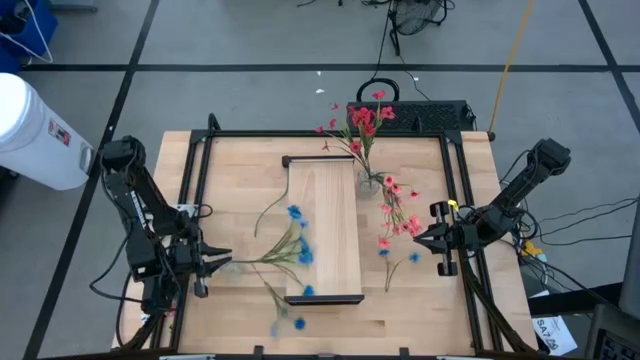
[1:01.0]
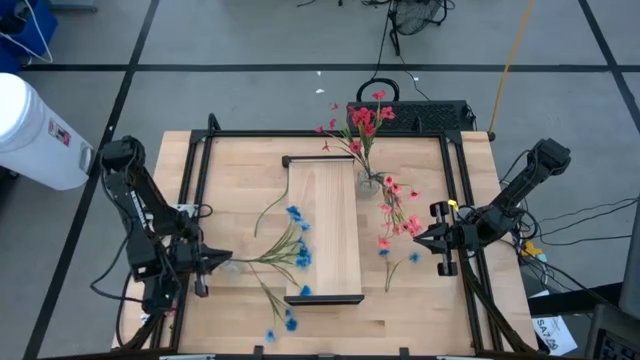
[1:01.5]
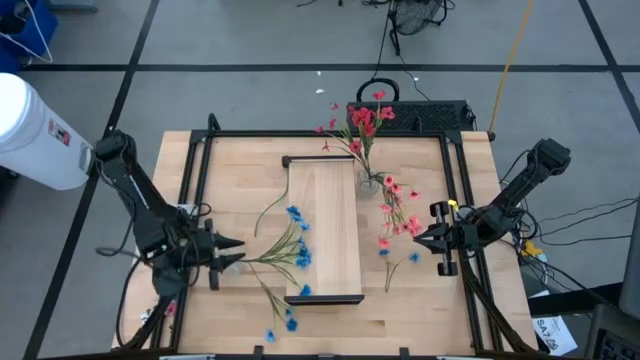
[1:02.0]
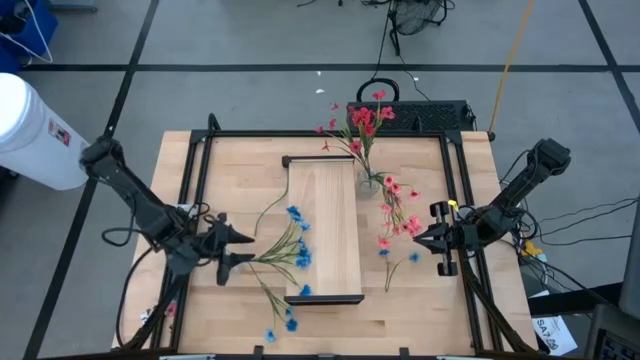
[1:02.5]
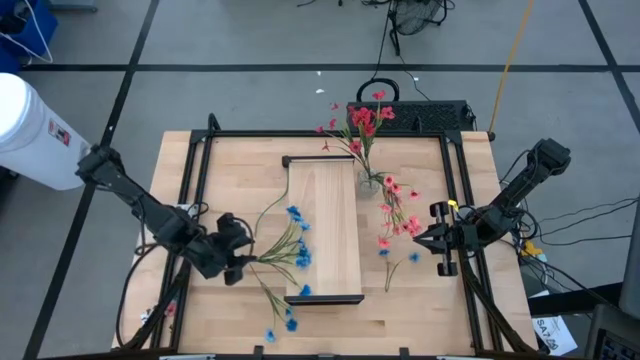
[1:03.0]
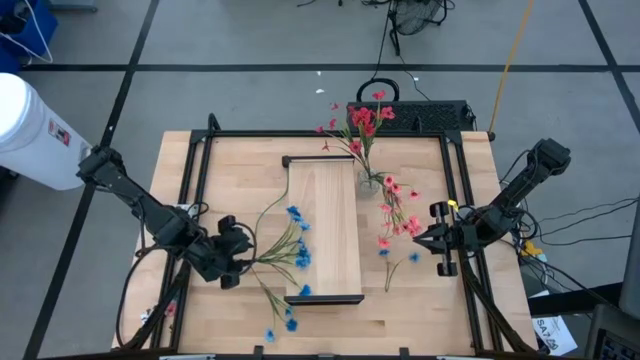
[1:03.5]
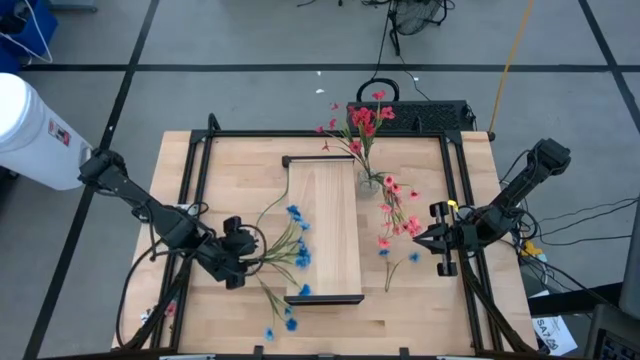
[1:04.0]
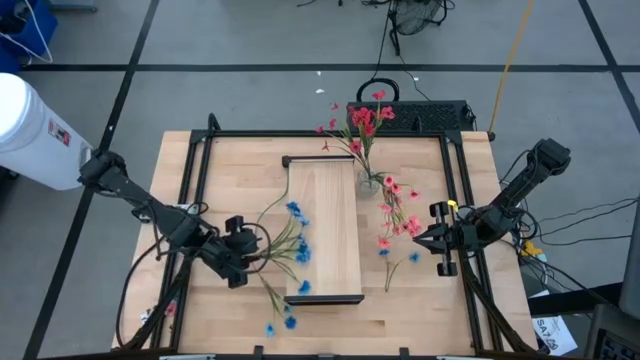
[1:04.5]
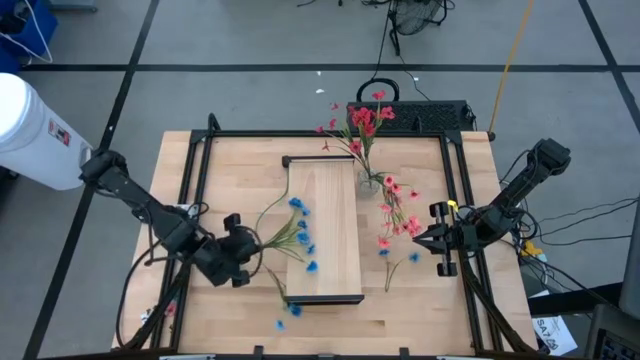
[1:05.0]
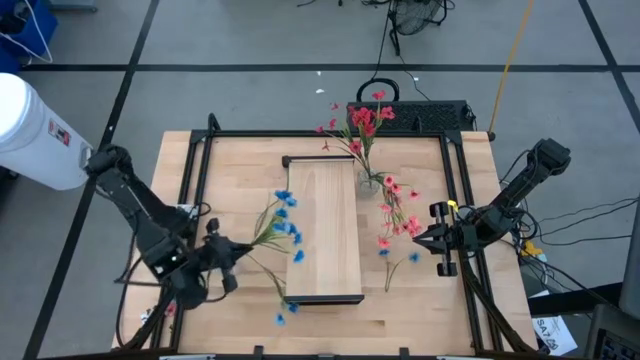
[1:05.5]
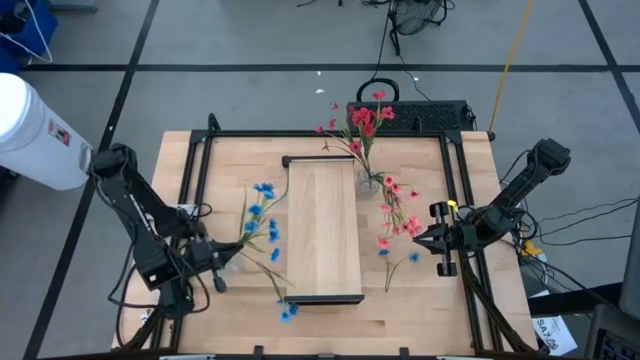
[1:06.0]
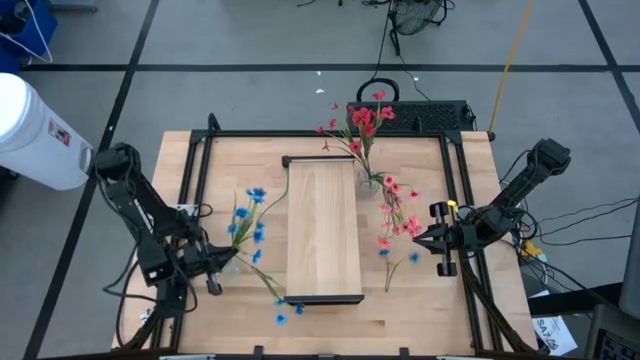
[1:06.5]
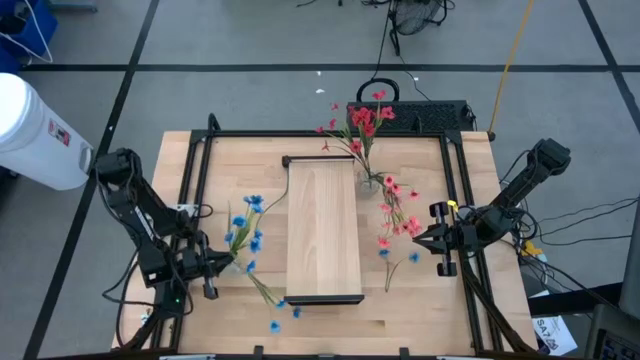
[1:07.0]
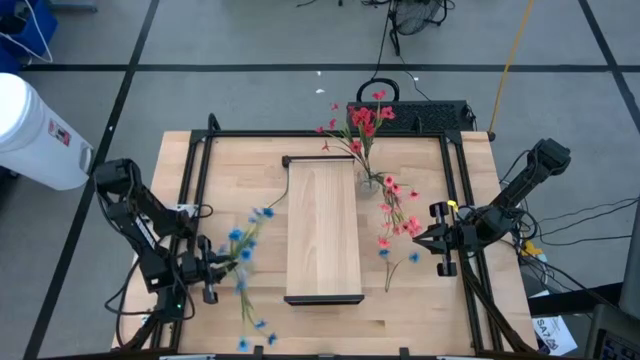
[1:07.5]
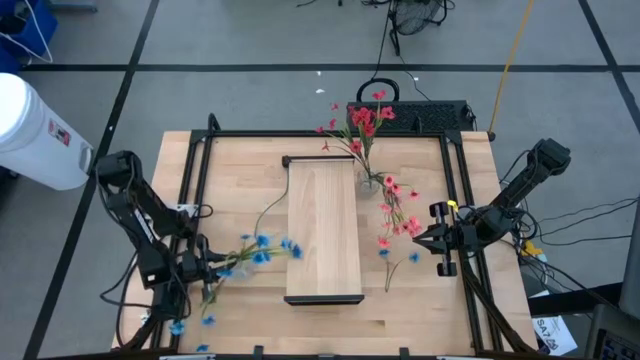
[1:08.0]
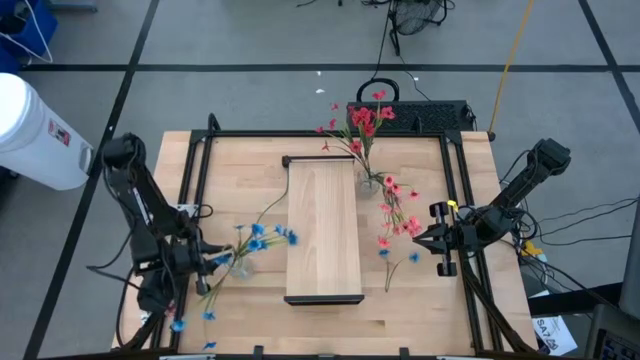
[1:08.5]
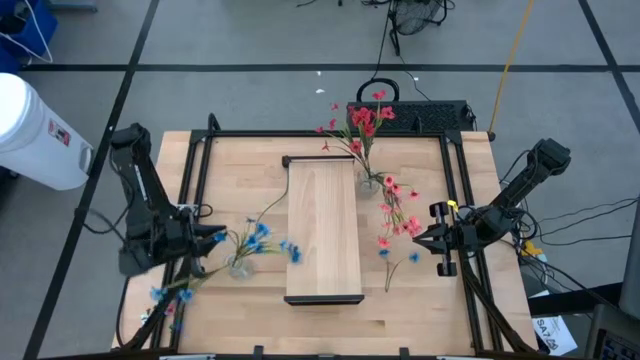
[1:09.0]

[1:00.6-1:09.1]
Task: Pick and place flowers into a vace then onto a shelf
Put the left blue flowers into the left transparent vase

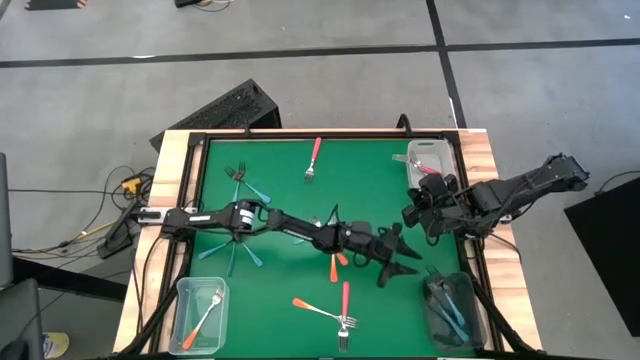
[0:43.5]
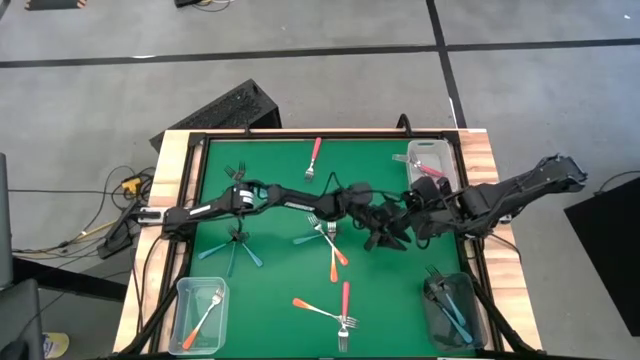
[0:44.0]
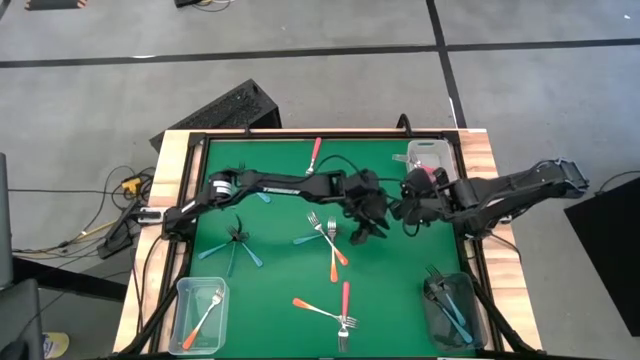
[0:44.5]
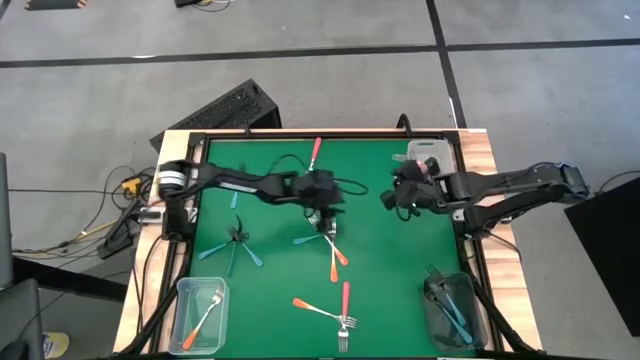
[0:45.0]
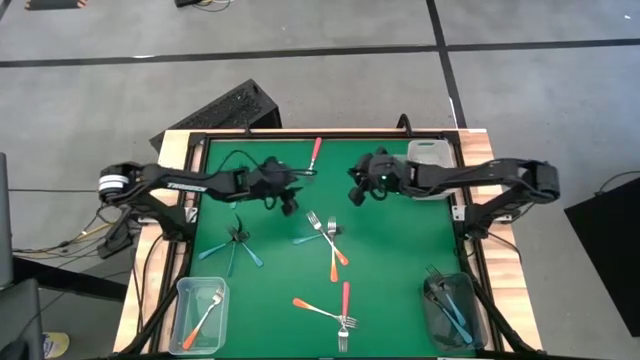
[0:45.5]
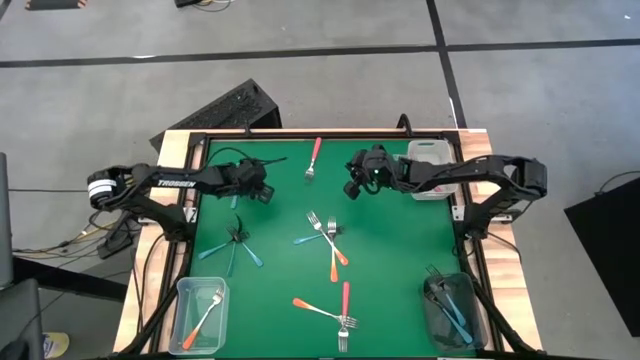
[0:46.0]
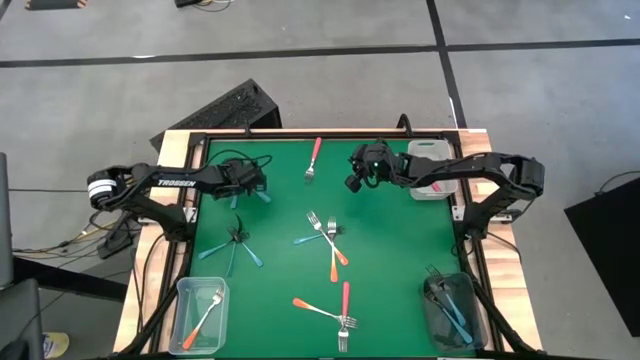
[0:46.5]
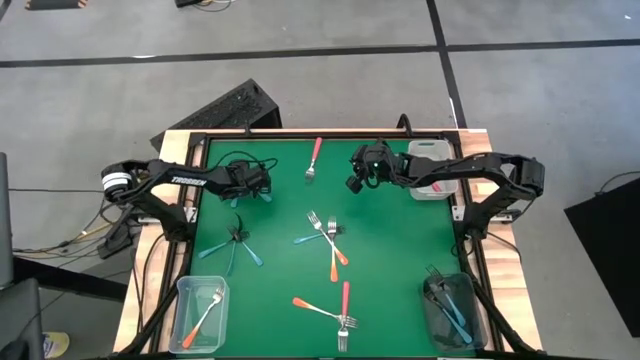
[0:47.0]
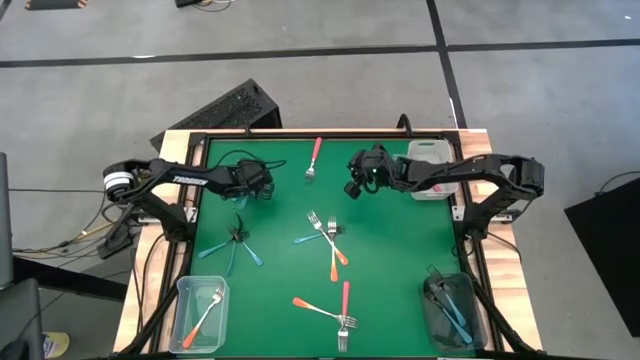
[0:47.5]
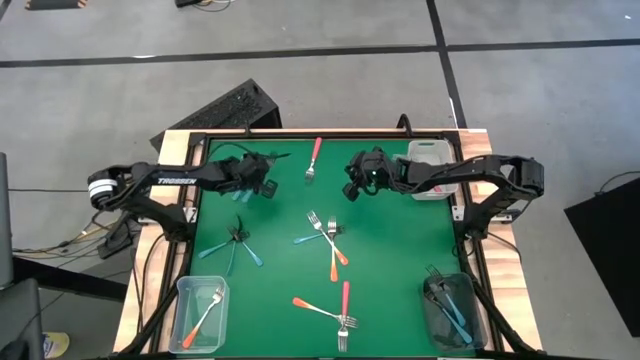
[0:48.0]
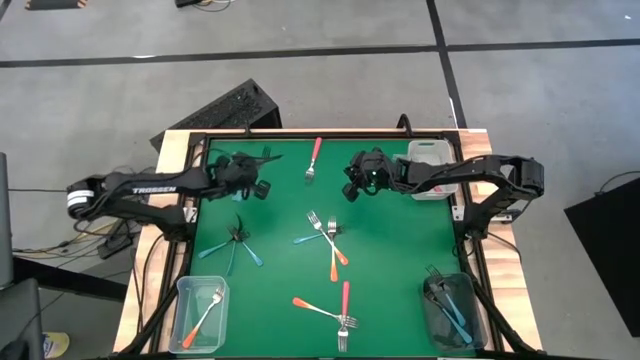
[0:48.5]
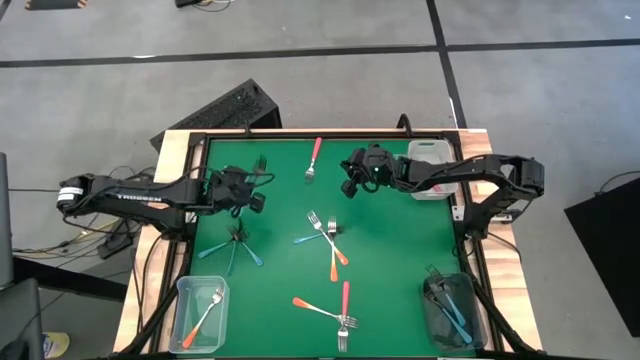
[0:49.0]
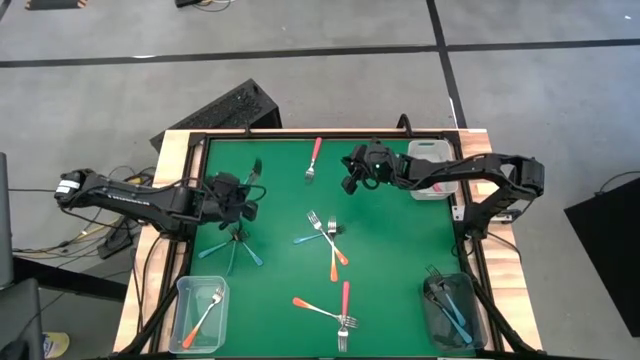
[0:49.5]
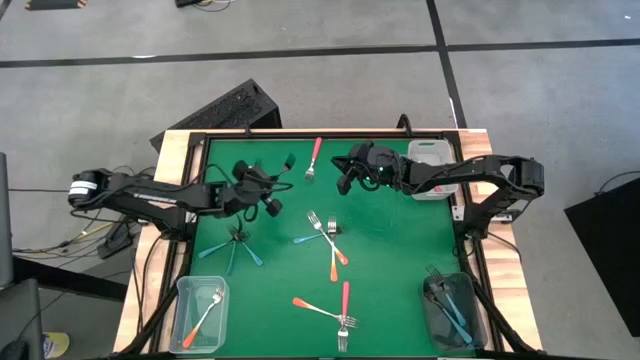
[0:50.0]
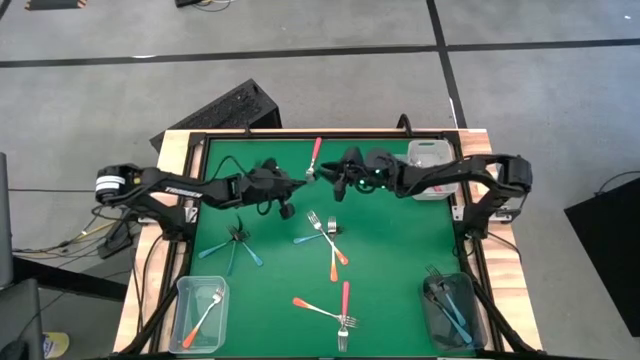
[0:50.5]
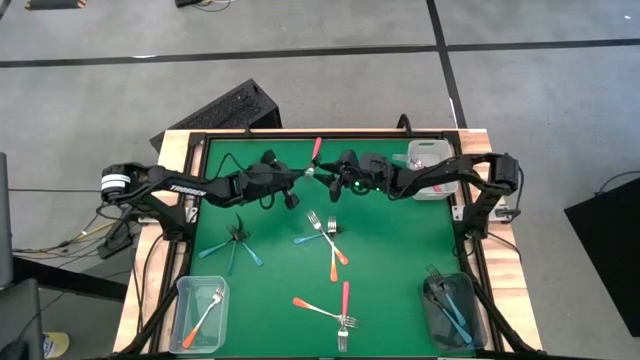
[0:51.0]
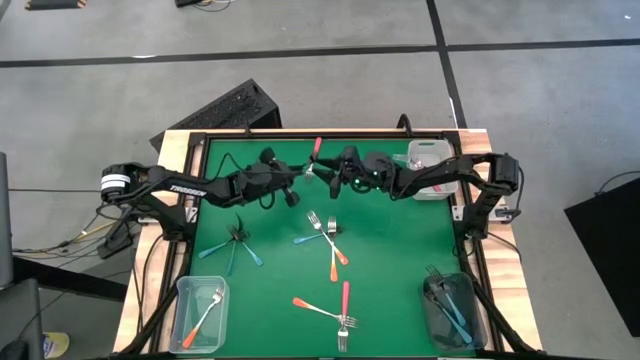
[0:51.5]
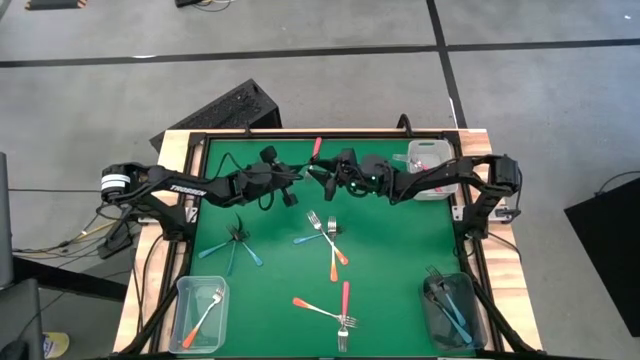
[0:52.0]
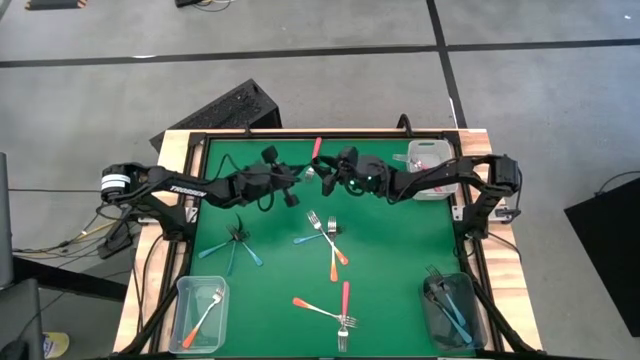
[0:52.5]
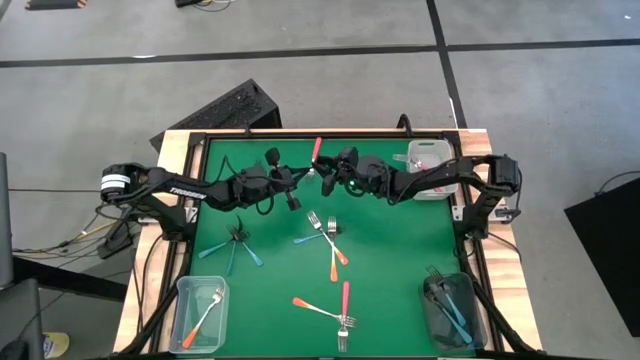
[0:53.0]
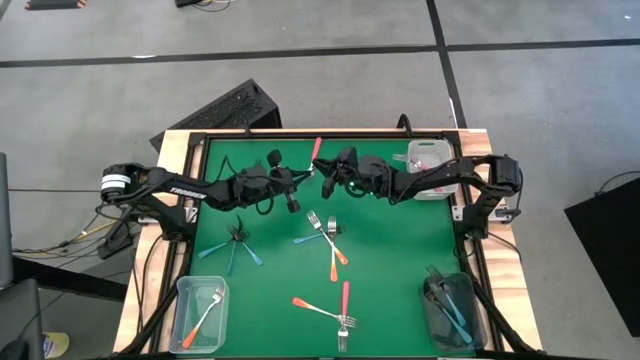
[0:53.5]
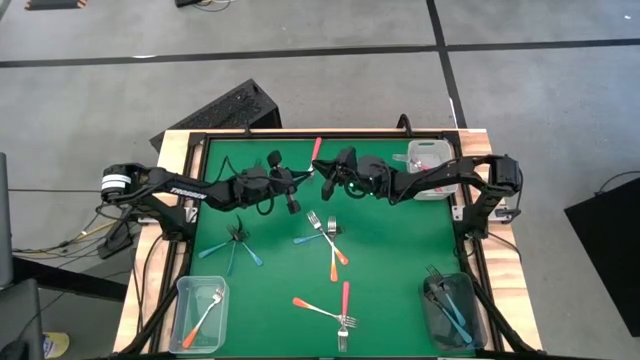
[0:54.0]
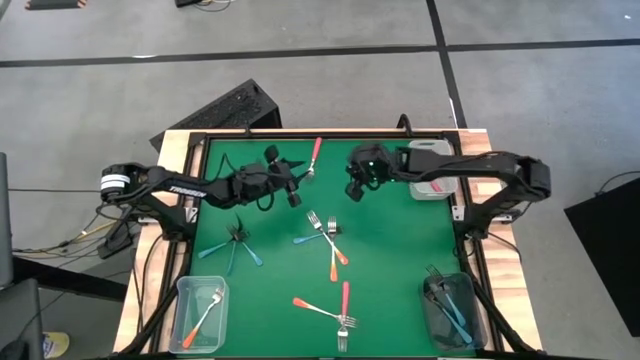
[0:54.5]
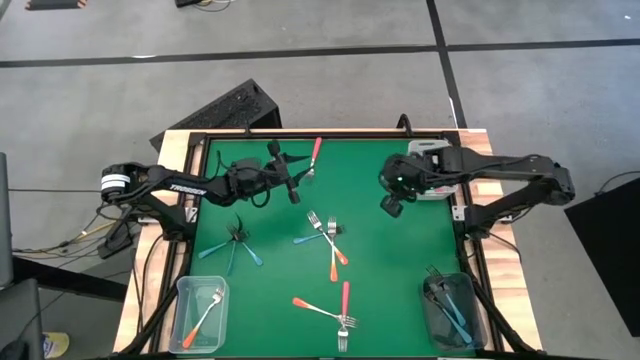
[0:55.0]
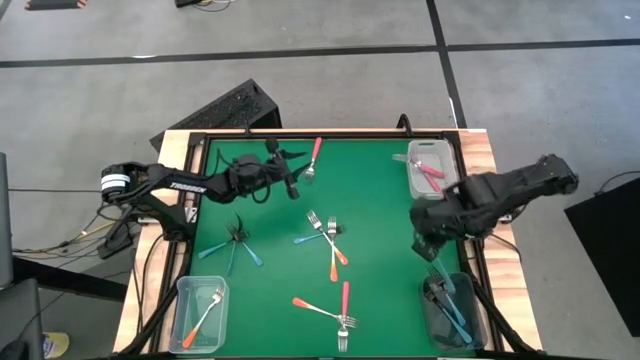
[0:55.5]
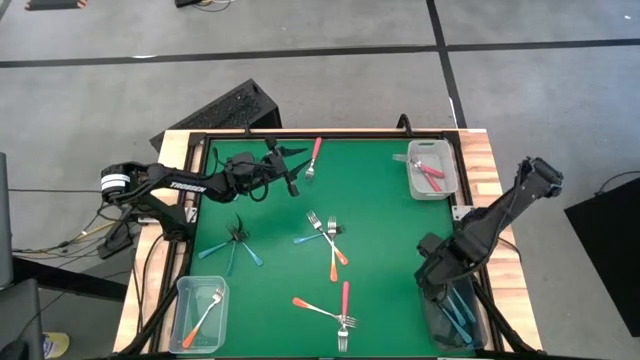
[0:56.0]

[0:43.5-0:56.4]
Task: Sort silverware by color (type)
Put the blue fork into the black bin
